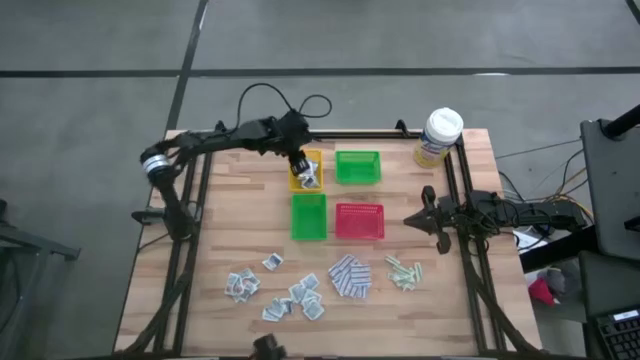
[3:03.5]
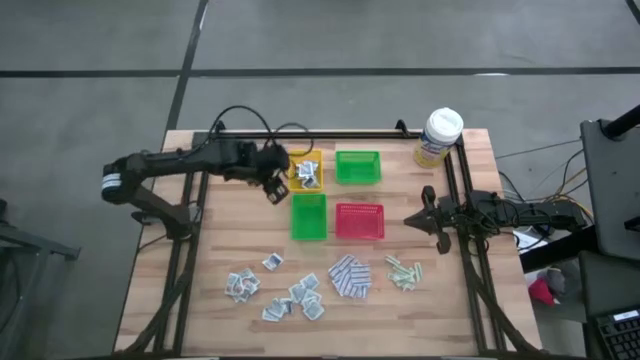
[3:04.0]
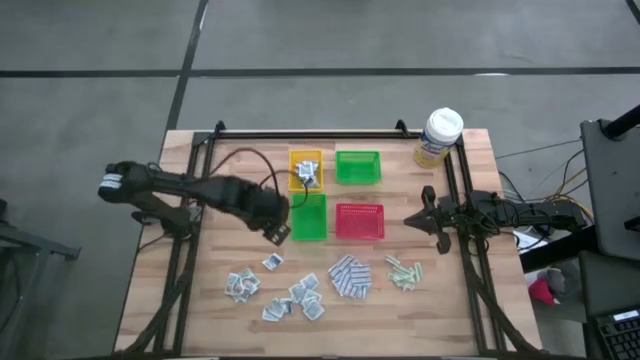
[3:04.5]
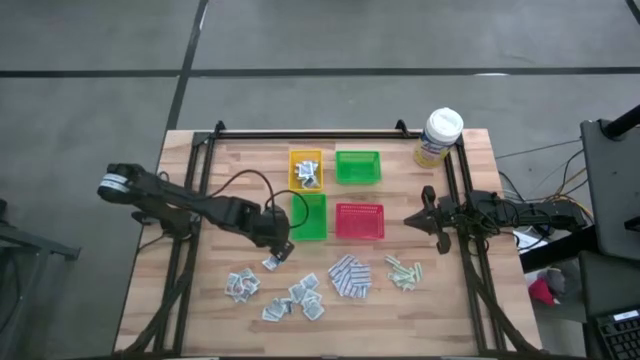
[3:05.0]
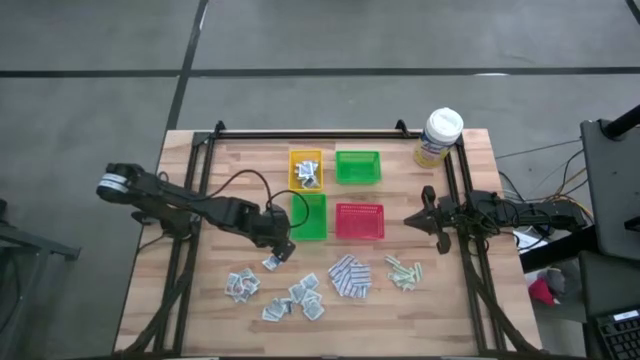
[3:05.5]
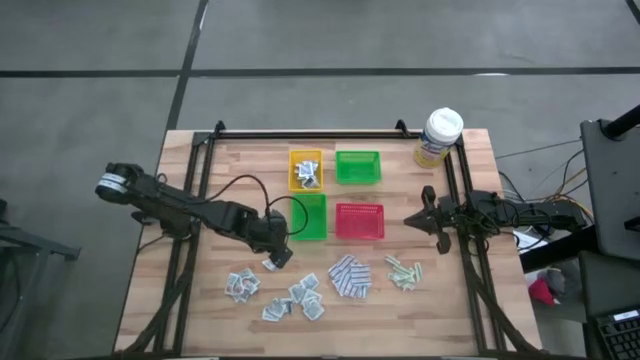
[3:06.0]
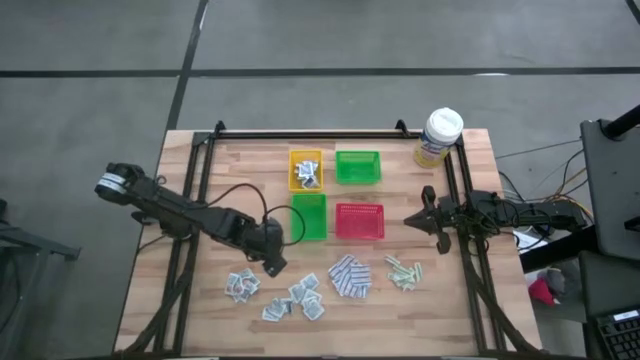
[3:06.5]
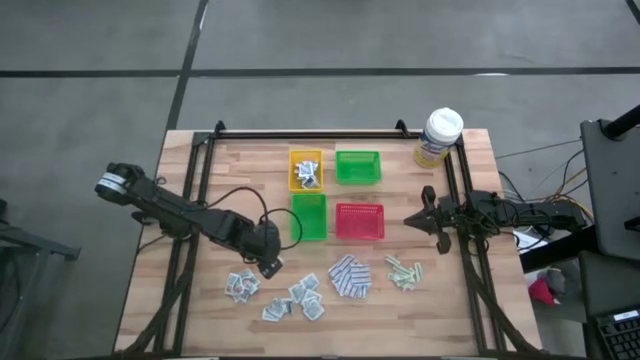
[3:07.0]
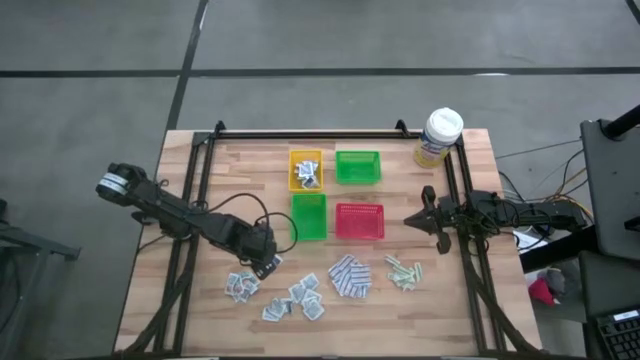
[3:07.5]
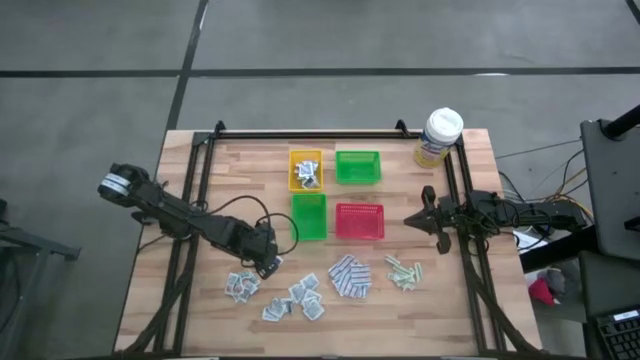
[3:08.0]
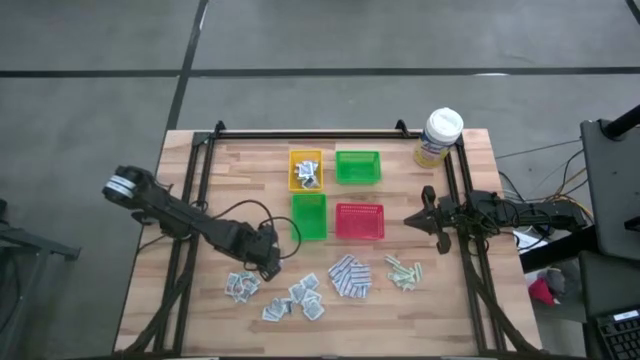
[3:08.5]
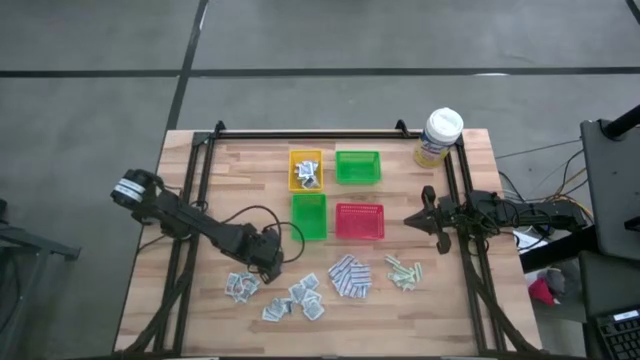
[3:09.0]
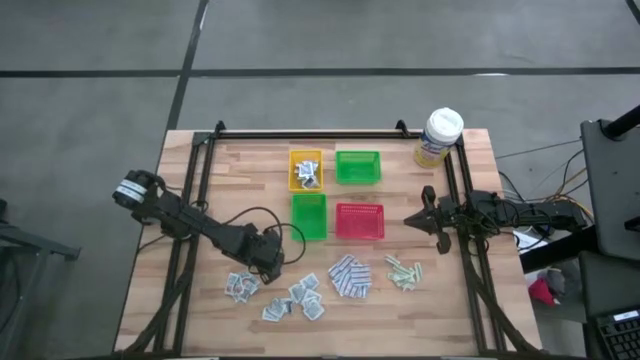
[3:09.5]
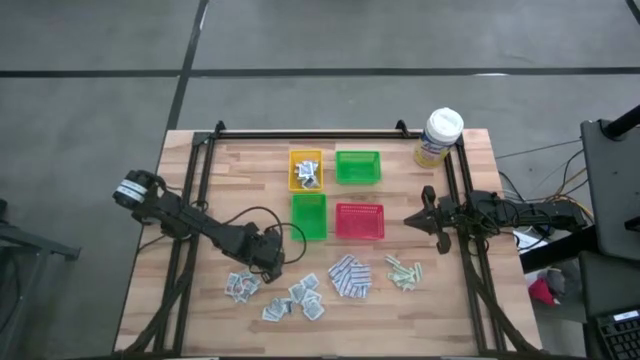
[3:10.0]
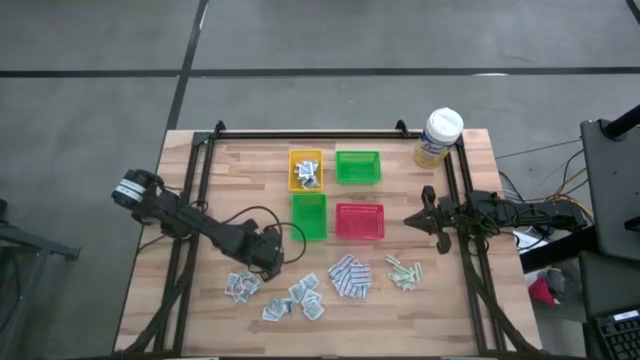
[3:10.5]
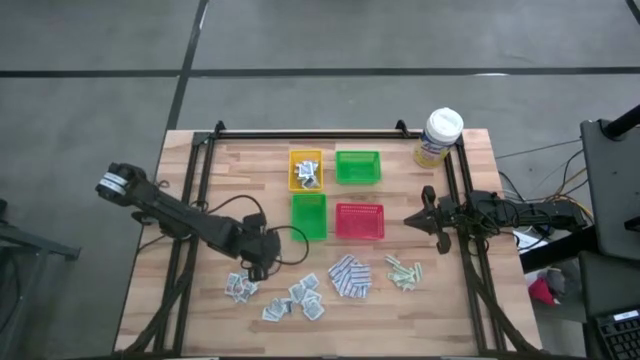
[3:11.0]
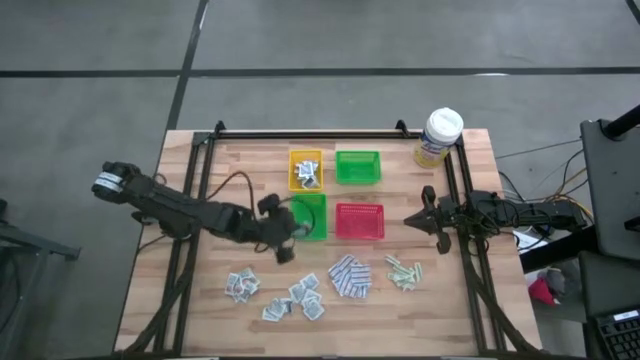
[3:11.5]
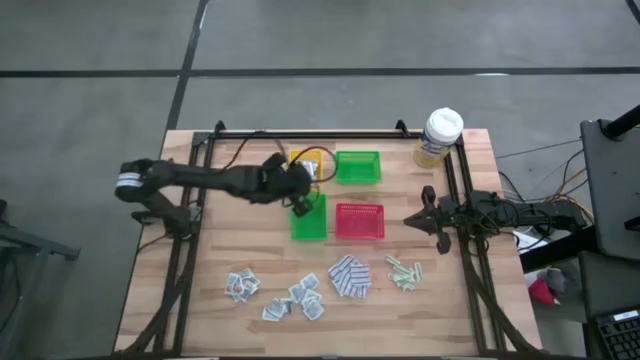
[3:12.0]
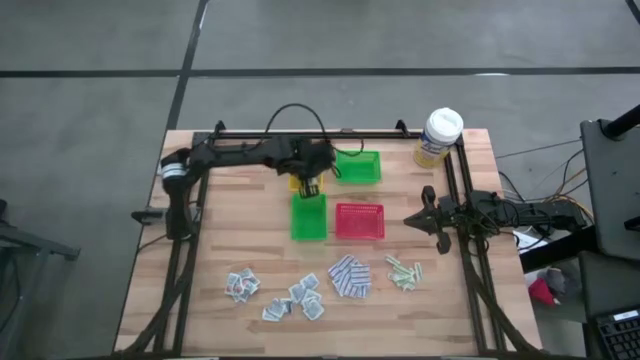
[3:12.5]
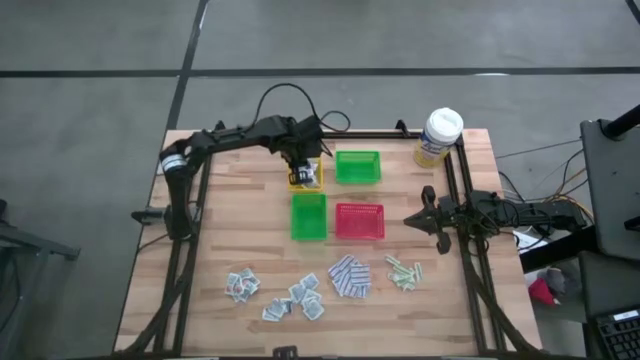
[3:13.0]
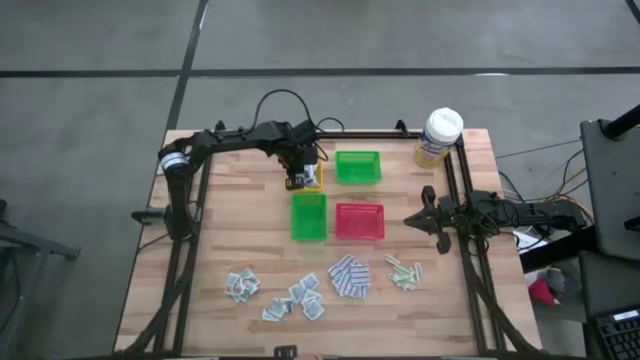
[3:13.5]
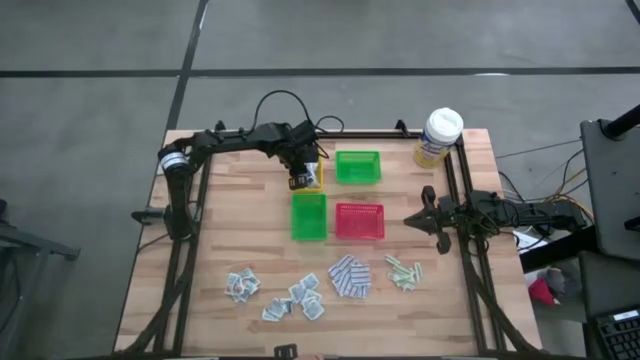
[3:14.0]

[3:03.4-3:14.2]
Task: Pick & Place First Aid Supplies
Put the blue alcohol pad into the yellow bin

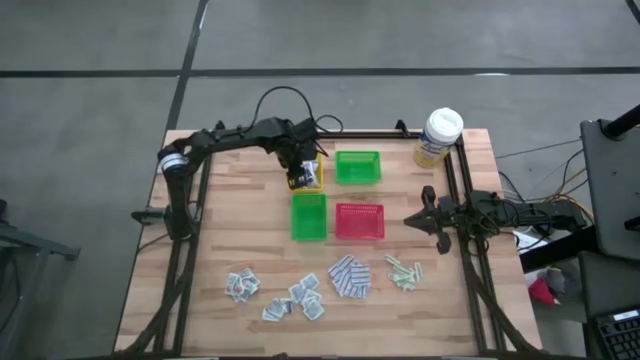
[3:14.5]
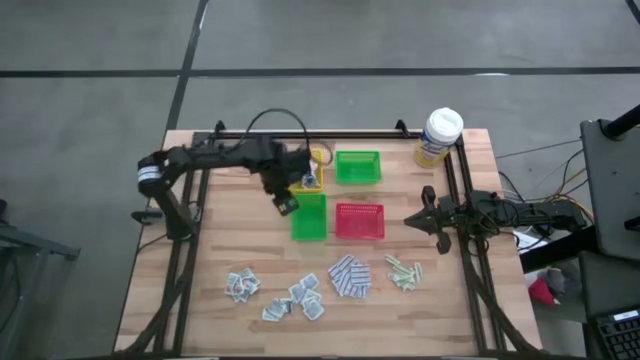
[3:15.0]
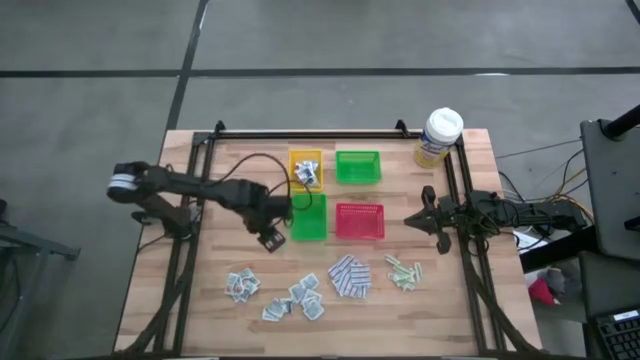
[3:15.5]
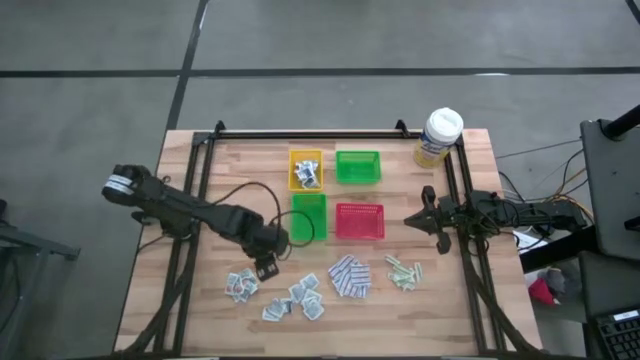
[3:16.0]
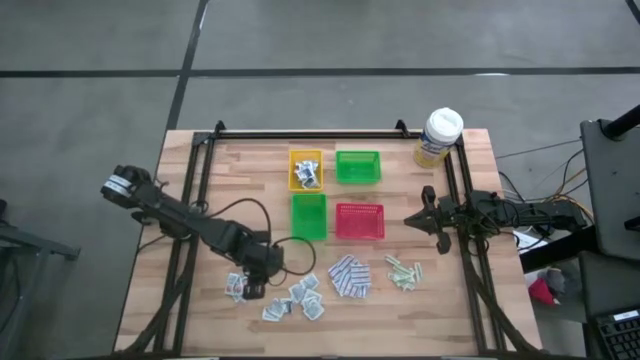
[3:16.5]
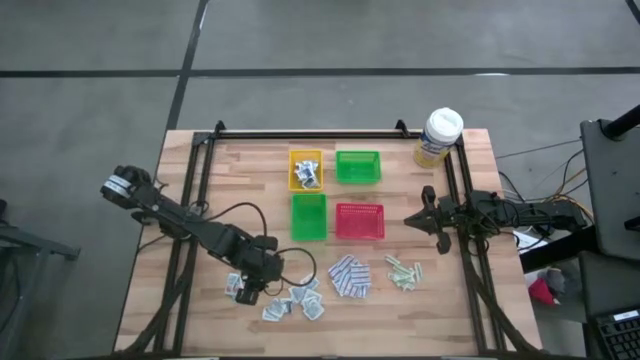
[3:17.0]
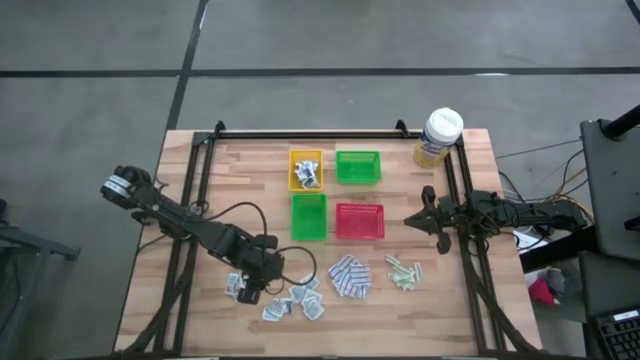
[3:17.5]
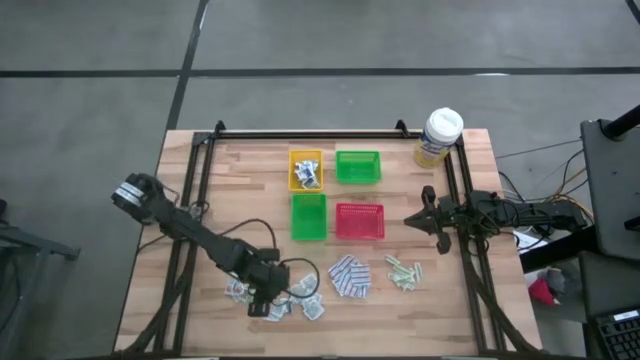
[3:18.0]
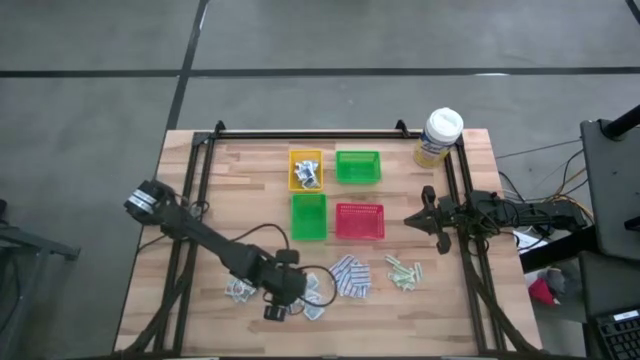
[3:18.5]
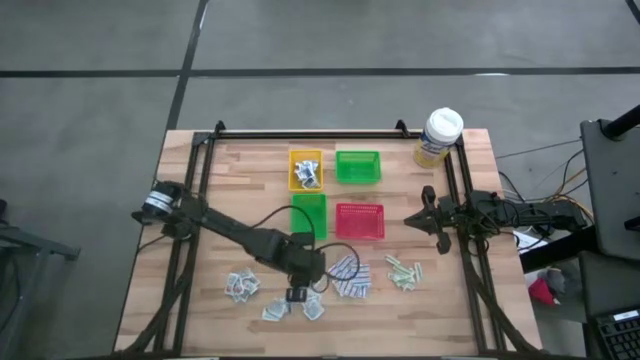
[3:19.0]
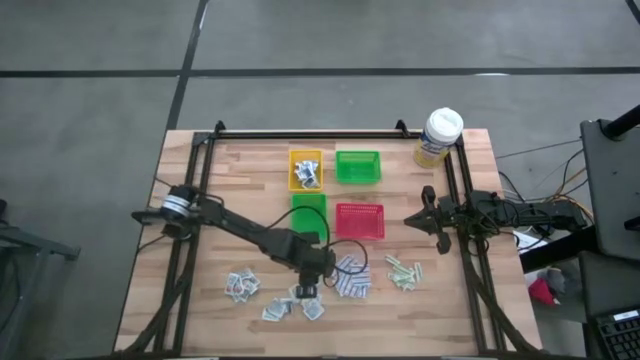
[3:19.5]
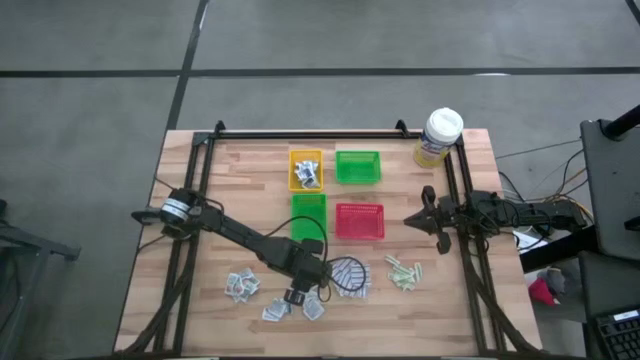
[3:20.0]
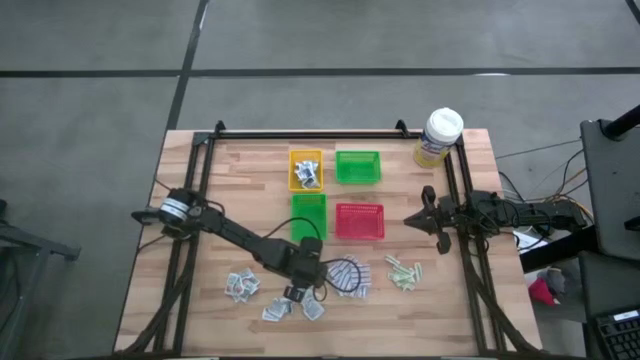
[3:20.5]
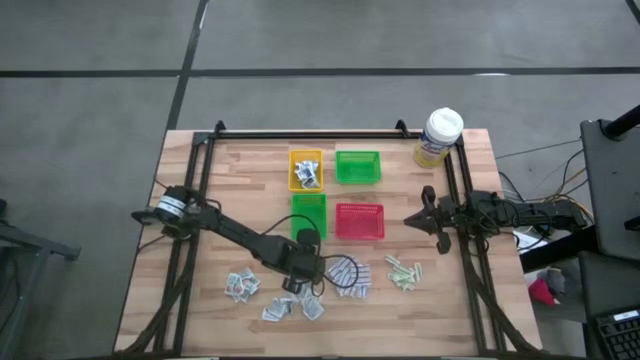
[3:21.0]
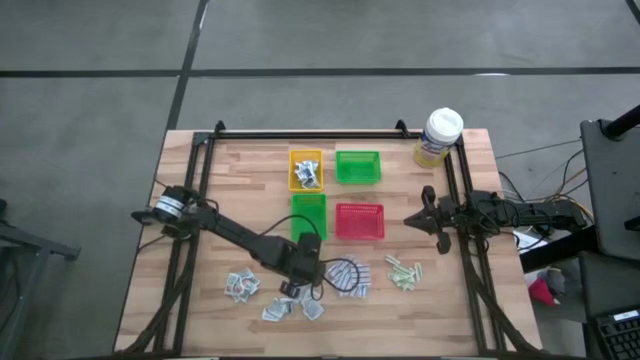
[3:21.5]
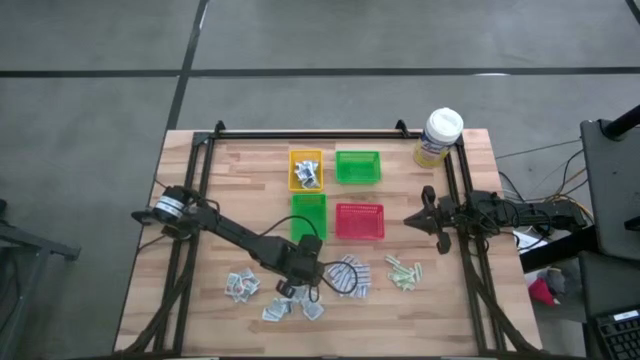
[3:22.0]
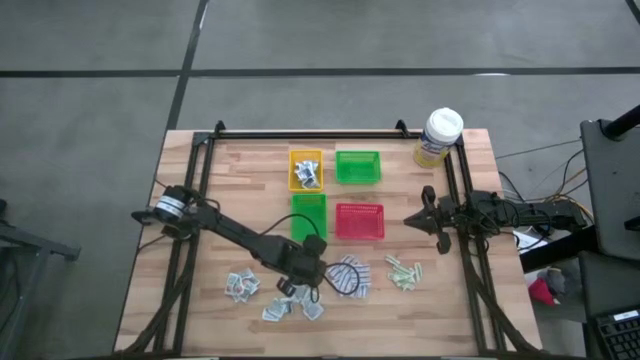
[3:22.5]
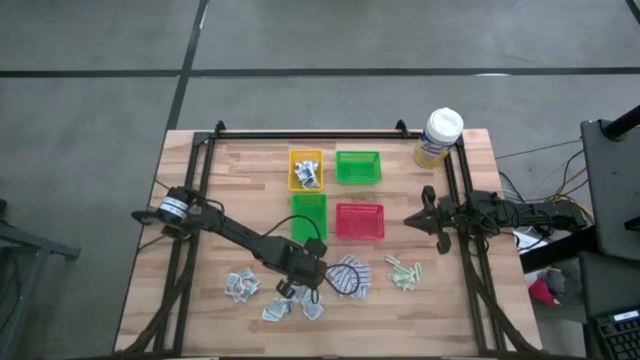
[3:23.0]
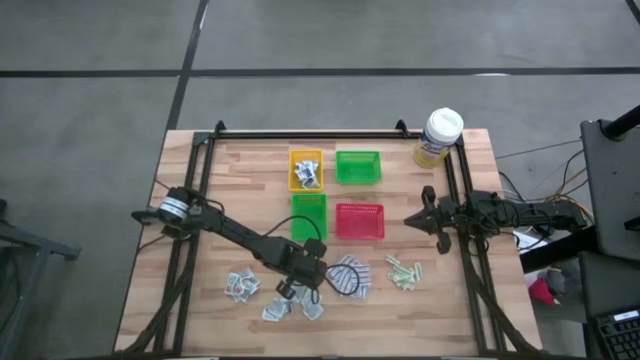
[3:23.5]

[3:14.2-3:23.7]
Put the blue alcohol pad into the yellow bin

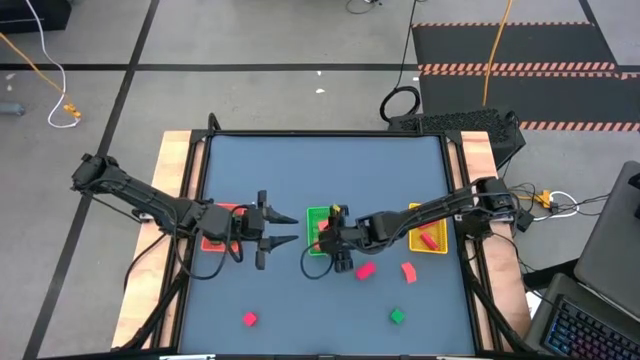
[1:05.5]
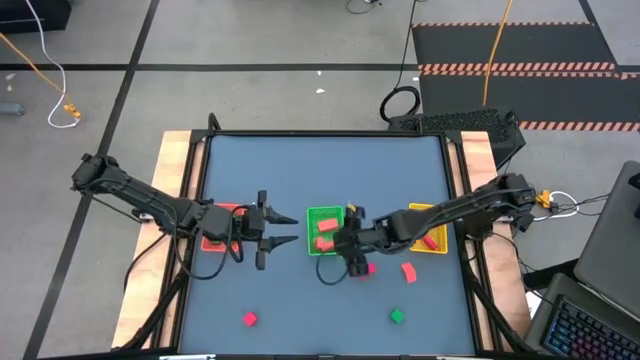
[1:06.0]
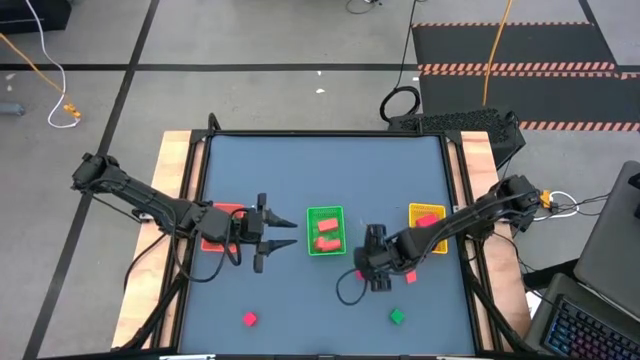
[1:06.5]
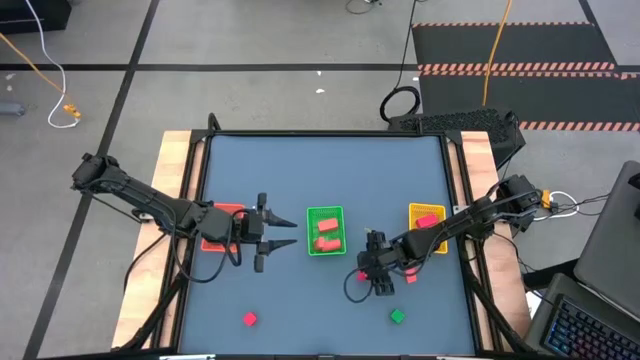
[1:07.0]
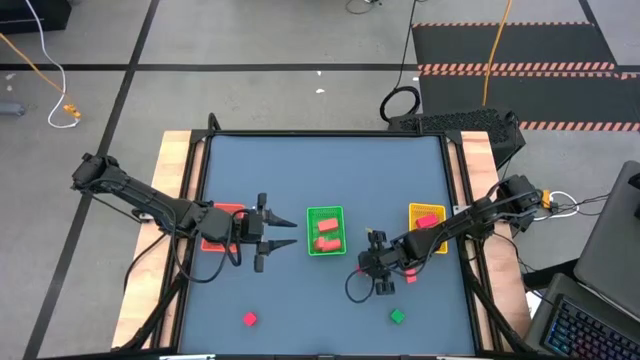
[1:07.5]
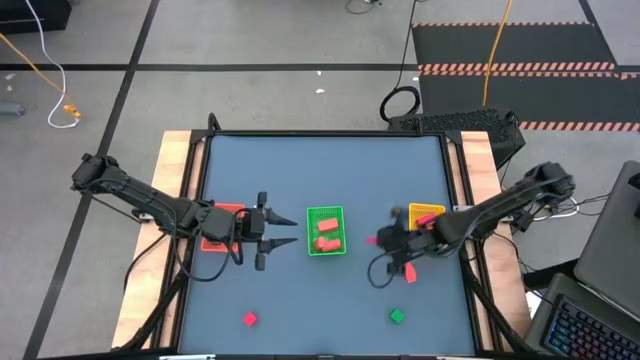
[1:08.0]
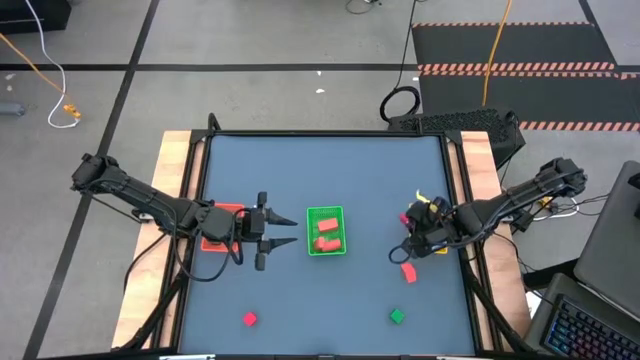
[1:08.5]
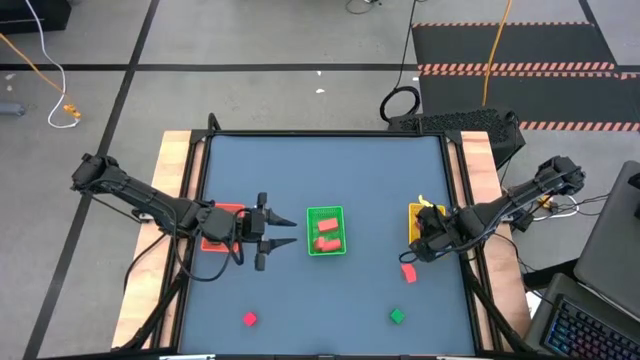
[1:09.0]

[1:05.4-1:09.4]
Task: Sort & place blocks by color
Put the red block into the yellow bin
